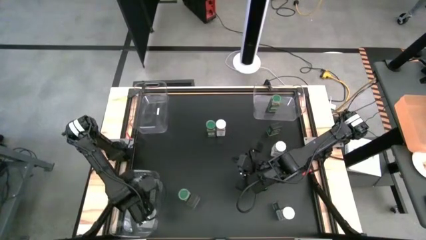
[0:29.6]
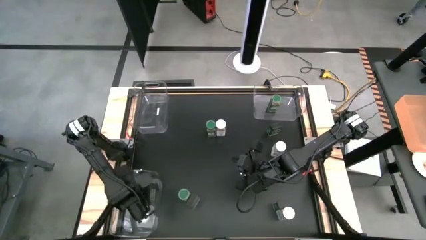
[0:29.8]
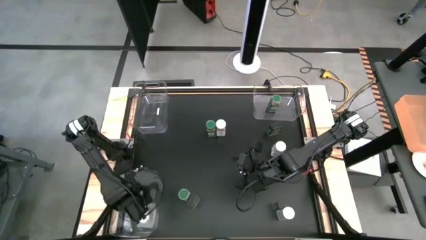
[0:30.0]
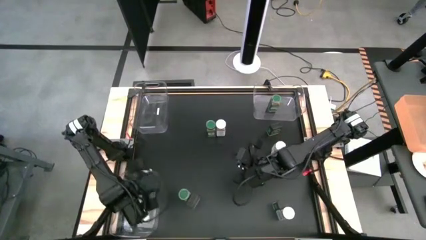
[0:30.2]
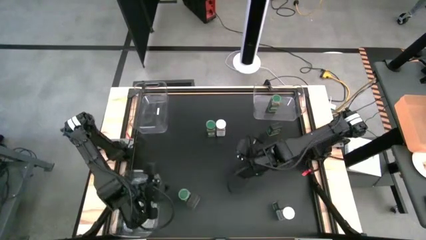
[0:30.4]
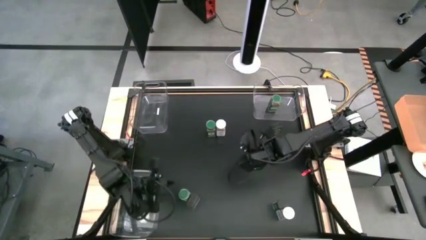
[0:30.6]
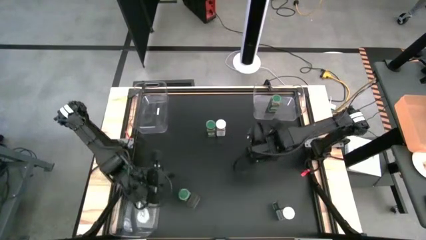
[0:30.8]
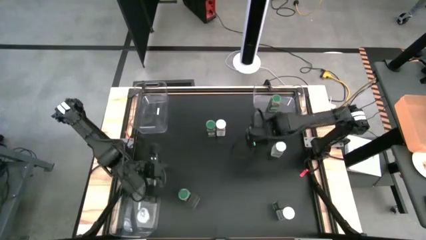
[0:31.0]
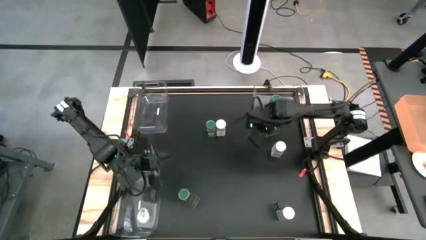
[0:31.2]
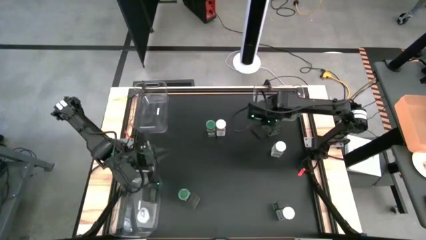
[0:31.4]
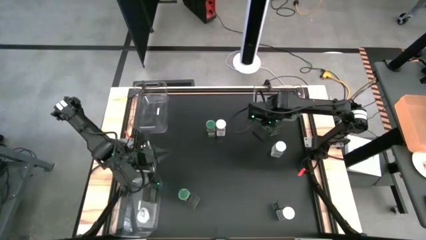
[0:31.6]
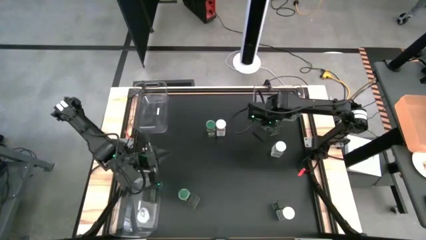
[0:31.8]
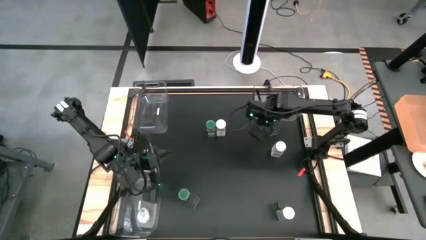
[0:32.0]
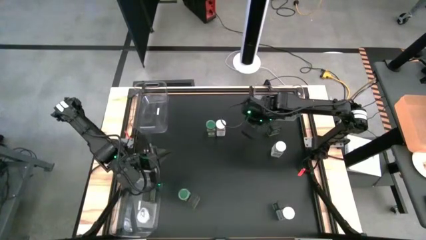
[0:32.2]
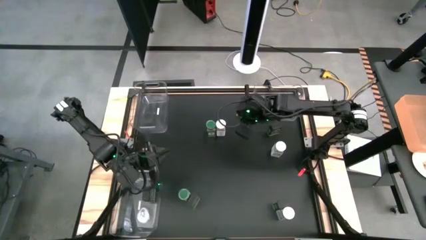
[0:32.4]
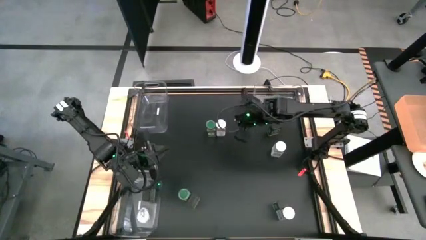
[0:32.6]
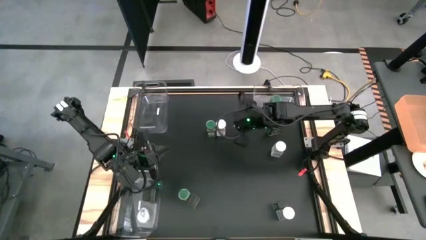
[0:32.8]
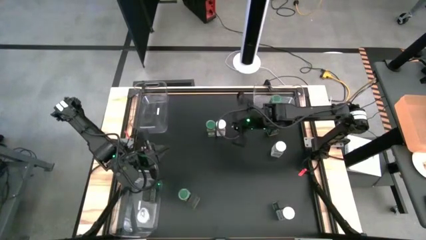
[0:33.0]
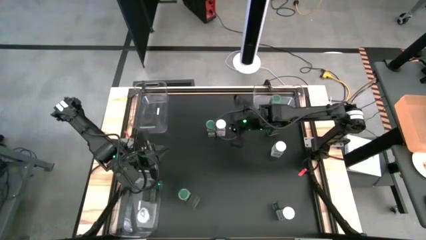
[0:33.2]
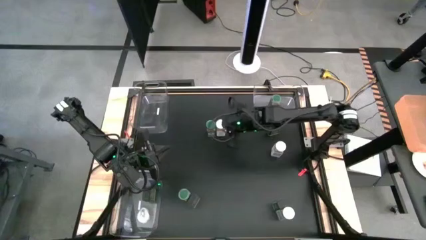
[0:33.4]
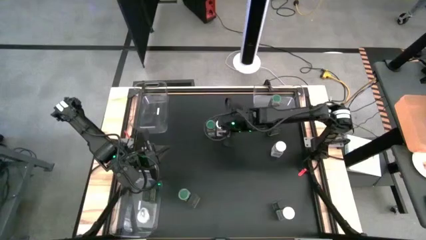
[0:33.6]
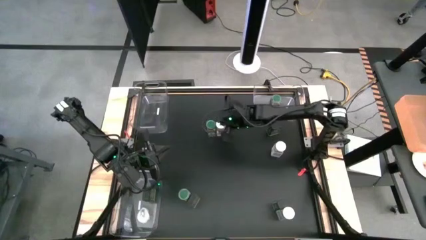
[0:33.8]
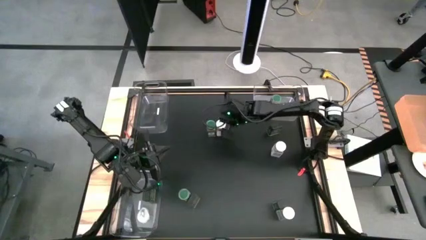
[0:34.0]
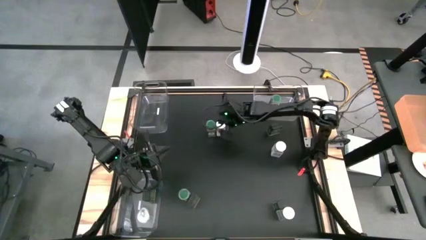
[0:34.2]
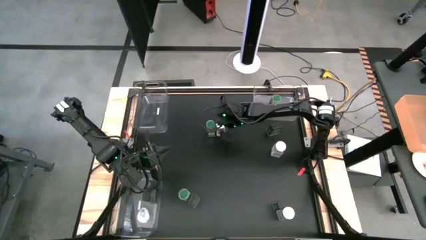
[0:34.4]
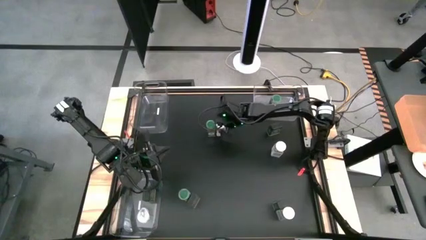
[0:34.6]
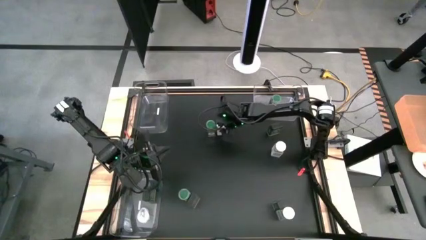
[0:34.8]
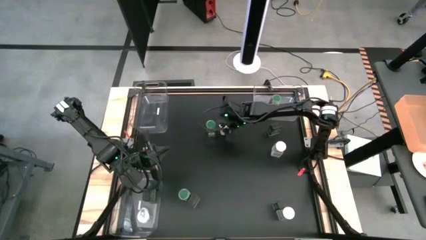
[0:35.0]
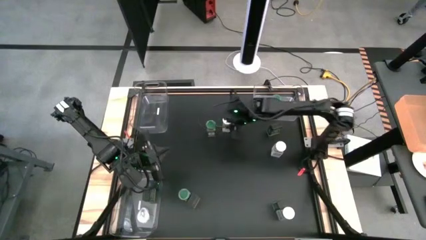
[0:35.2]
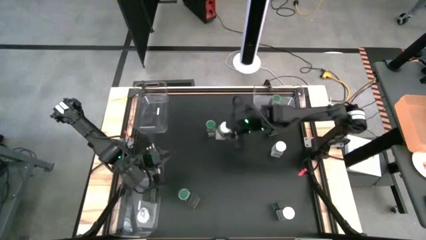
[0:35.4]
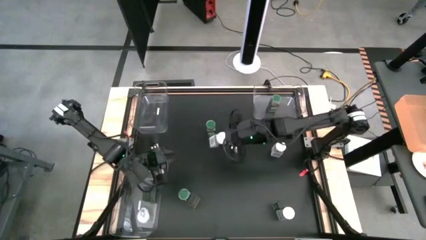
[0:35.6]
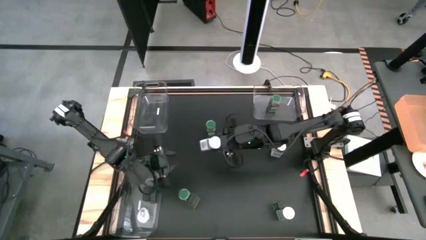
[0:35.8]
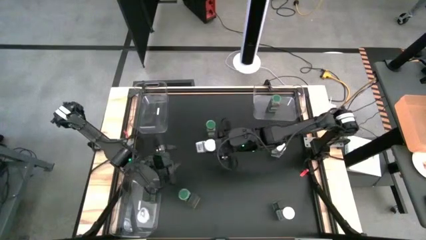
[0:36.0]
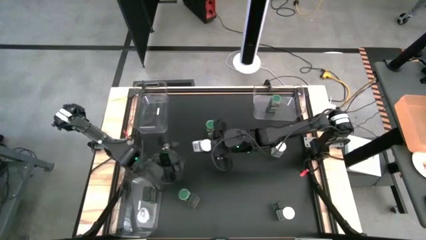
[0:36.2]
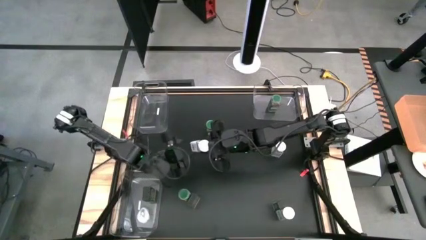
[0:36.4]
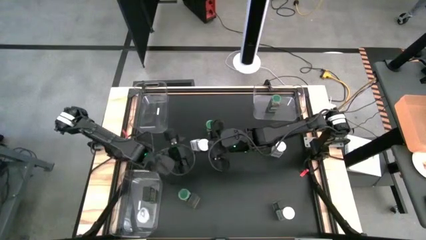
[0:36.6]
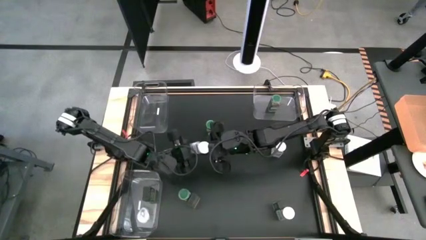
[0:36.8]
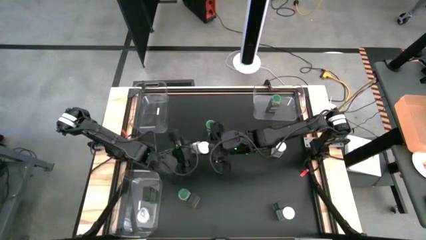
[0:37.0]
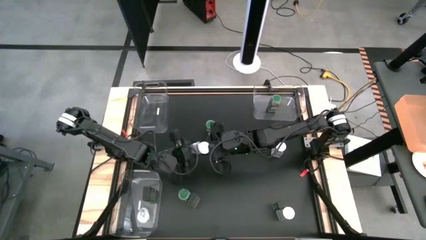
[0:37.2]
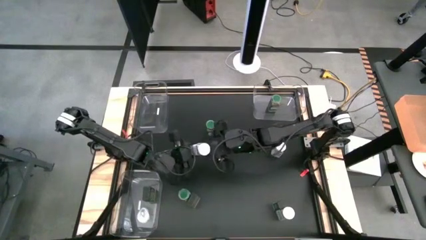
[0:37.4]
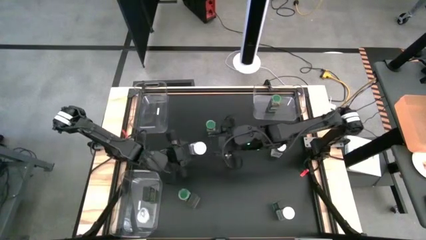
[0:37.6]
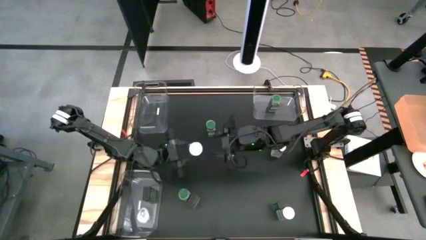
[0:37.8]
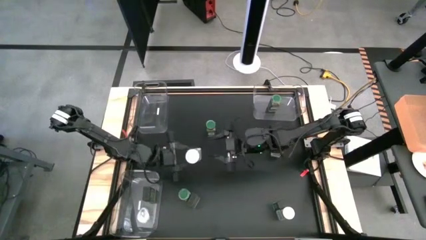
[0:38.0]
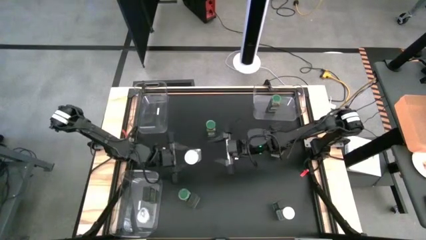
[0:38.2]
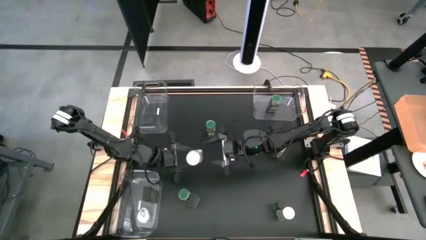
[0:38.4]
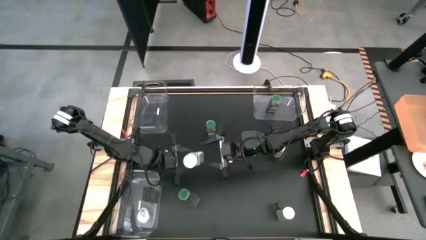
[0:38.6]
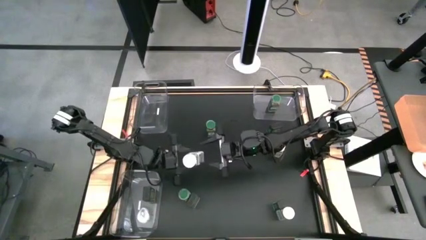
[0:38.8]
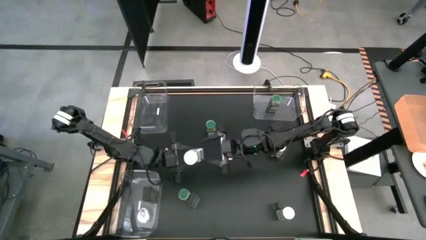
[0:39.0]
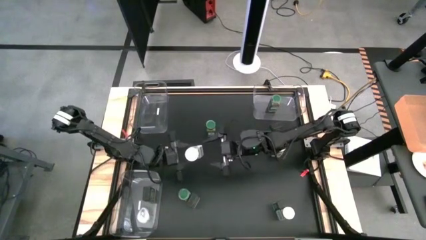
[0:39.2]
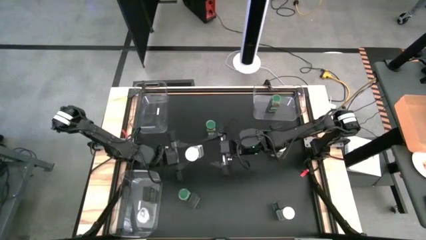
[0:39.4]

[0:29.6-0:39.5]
Task: Sort spices by type
Put the top white seasoning bottle into the top left transparent bin

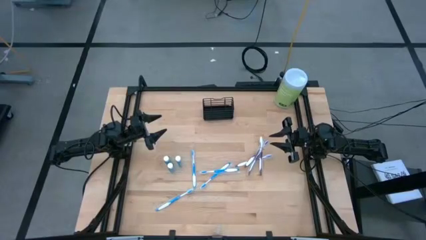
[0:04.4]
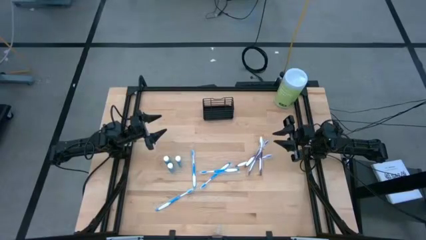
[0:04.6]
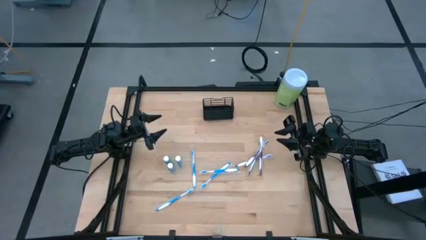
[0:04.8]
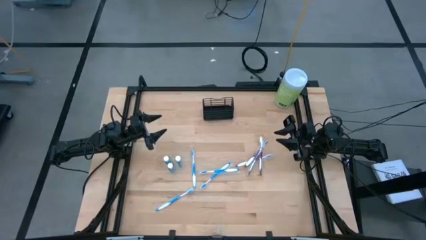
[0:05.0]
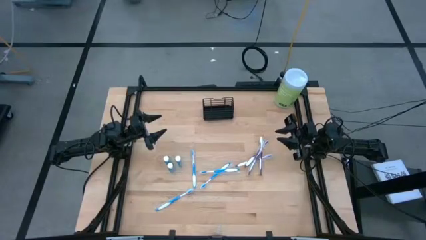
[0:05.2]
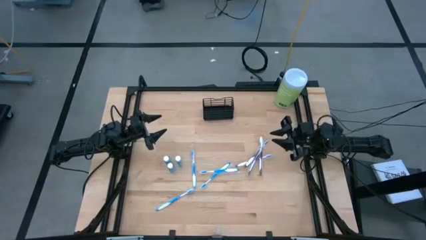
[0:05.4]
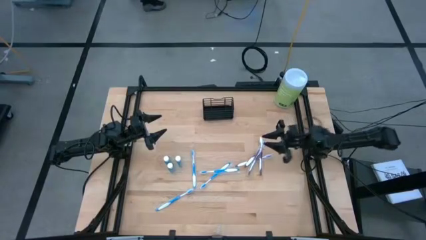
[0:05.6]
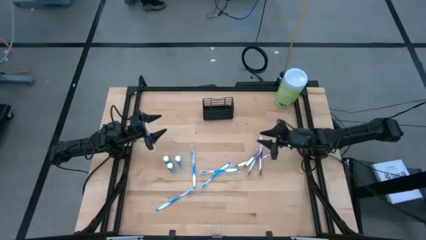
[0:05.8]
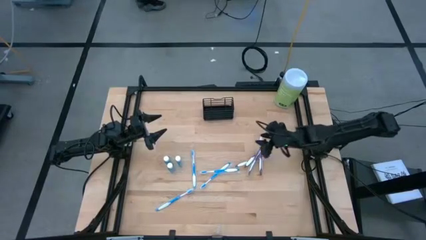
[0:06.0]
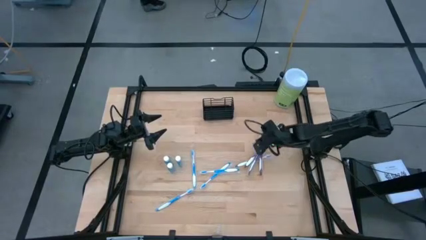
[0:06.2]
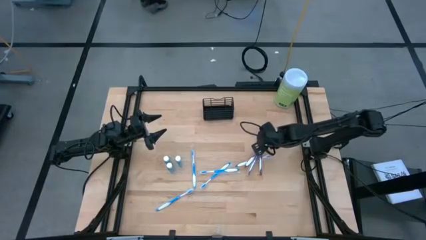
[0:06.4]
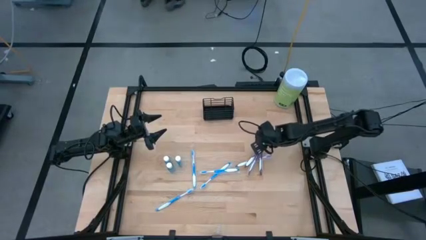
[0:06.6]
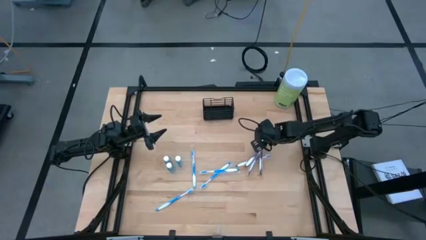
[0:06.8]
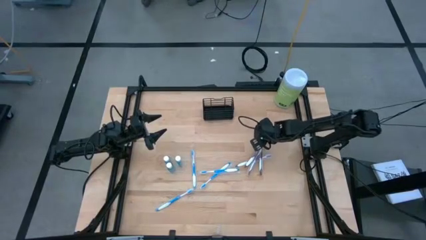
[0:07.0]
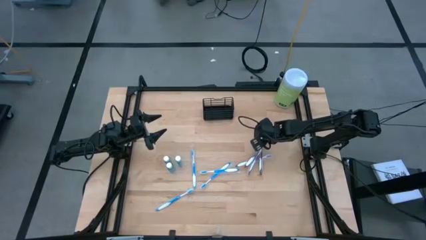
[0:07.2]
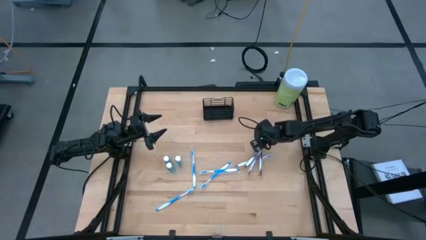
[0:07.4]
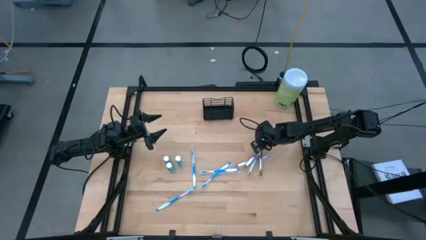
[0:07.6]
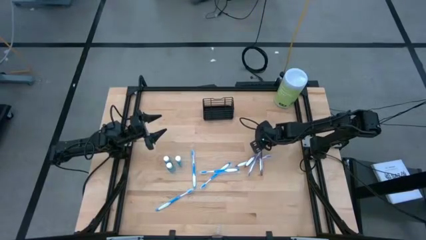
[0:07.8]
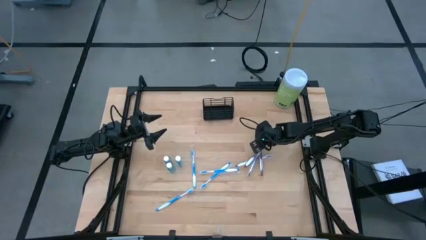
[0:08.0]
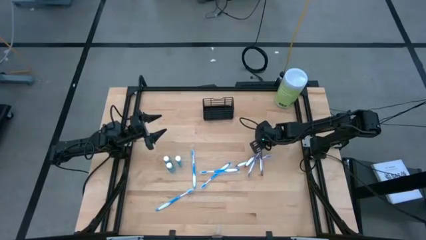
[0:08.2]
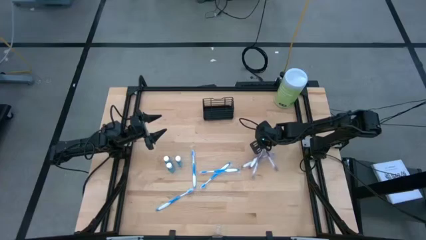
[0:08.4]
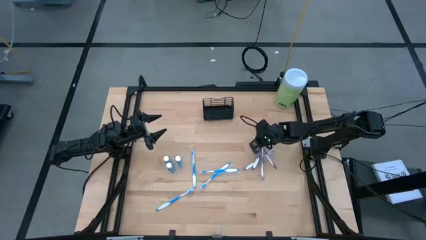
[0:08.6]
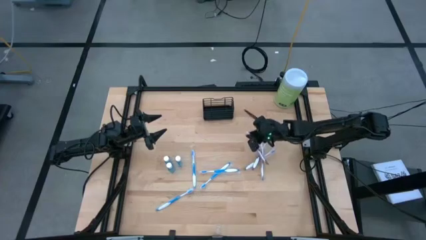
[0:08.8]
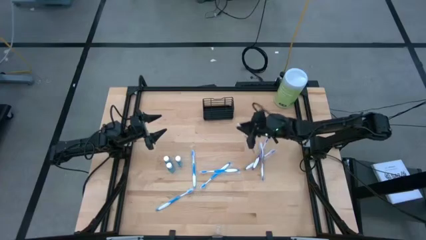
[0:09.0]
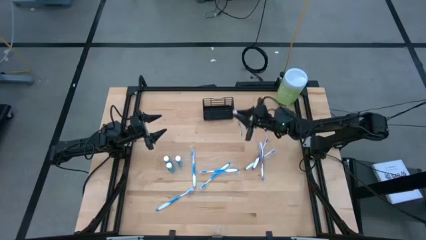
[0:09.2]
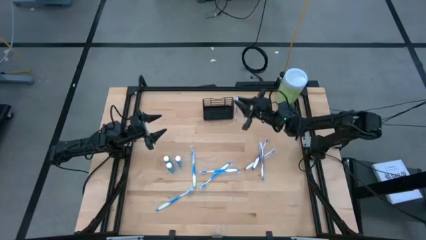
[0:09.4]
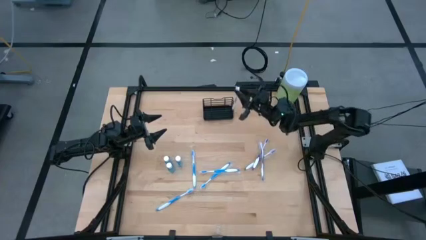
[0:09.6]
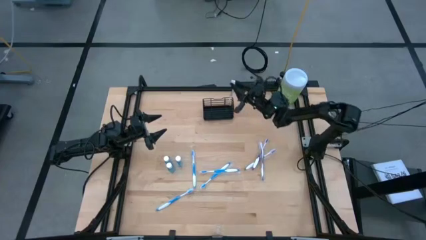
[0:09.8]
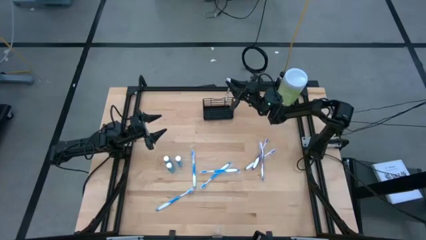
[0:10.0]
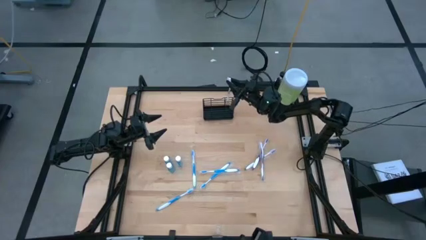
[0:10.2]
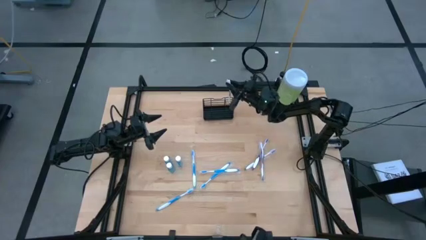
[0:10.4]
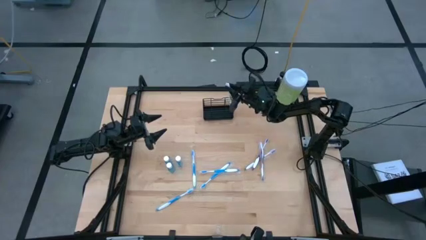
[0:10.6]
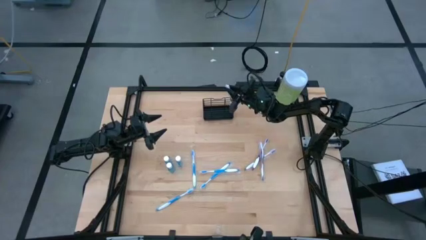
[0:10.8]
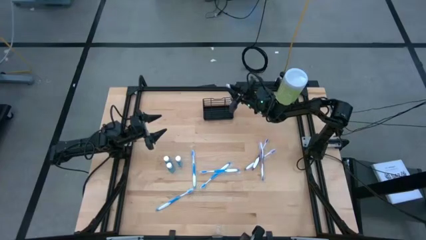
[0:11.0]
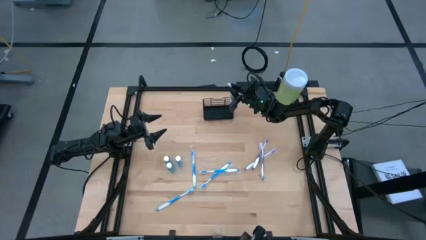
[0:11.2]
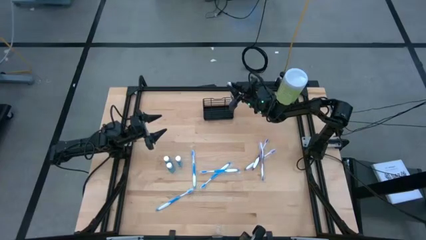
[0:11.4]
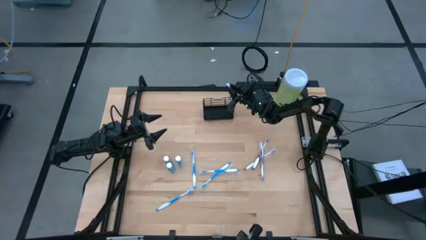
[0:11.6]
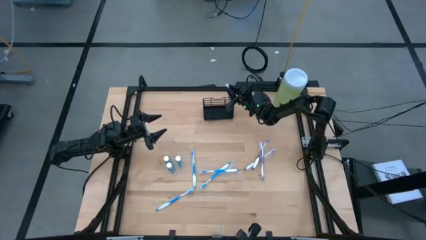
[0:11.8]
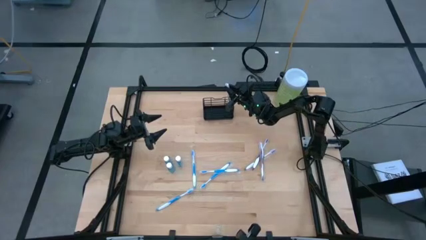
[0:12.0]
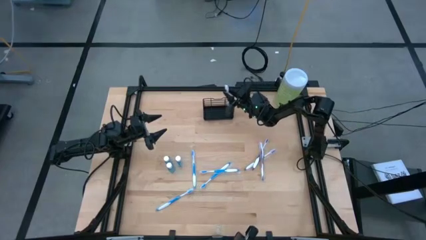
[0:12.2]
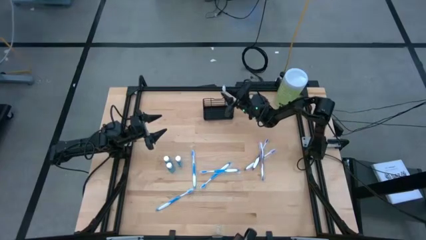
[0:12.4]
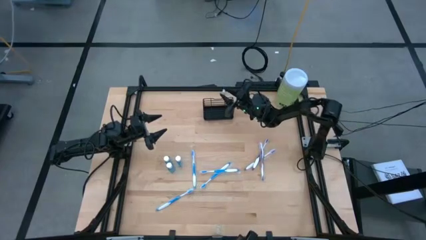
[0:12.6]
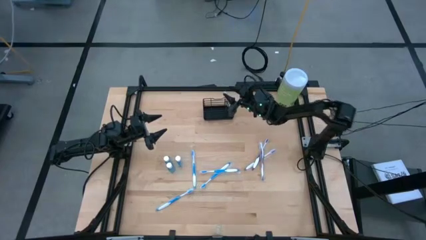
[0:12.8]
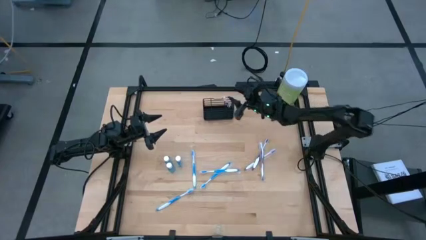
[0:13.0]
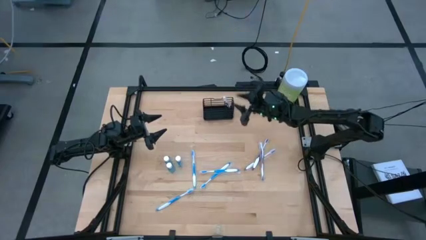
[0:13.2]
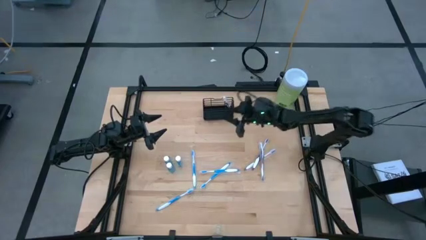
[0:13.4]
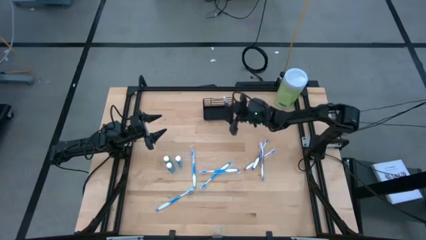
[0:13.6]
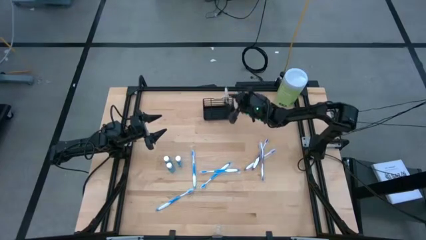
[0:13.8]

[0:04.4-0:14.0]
Task: Pick & Place toothbrushing station
Put the violet toothbrush into the right compartment of the wire organizer
